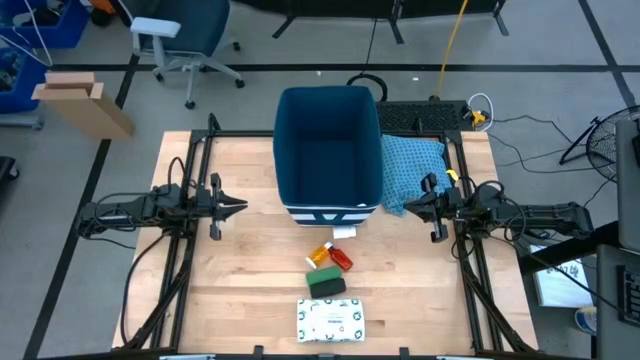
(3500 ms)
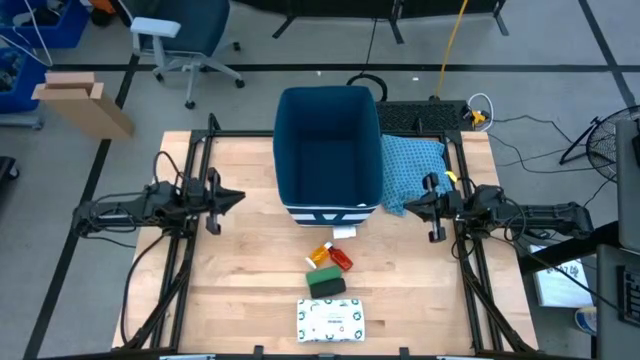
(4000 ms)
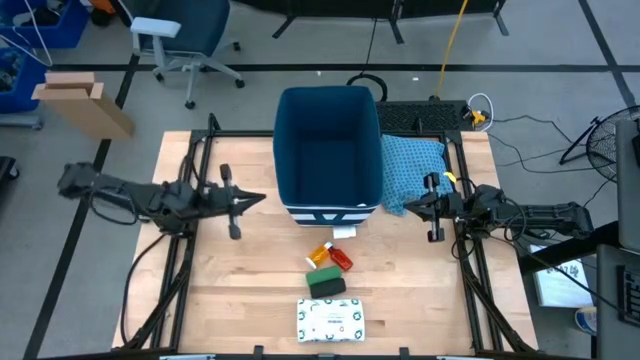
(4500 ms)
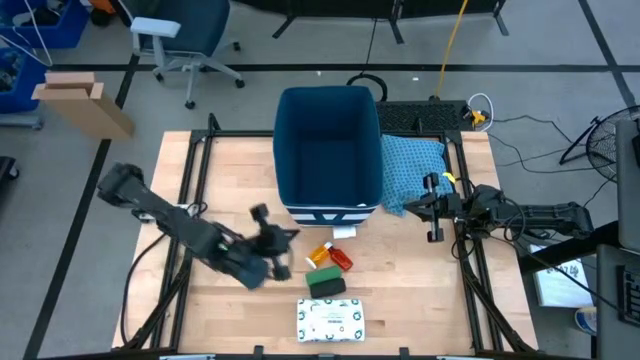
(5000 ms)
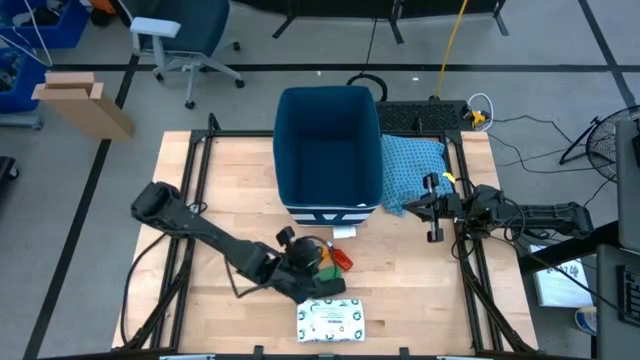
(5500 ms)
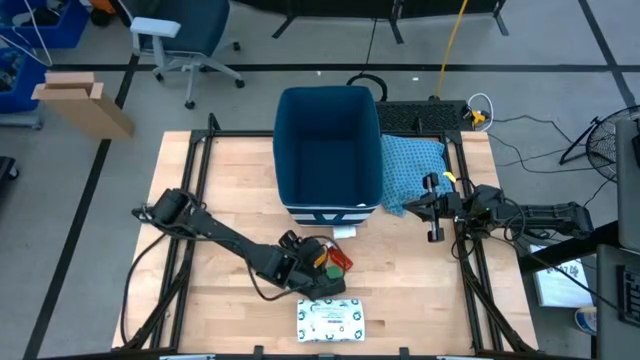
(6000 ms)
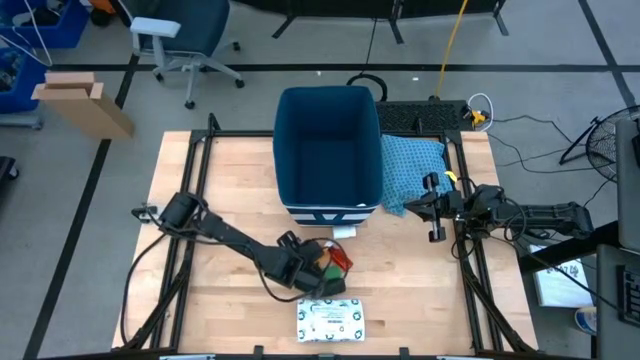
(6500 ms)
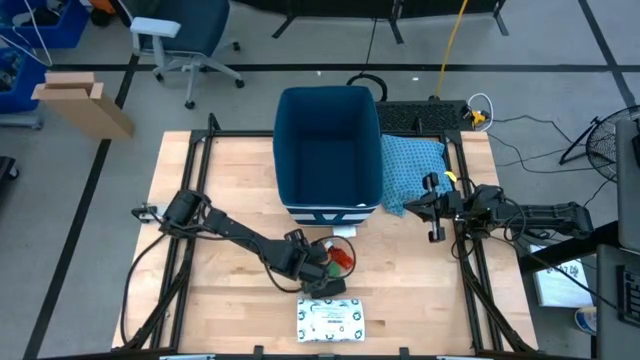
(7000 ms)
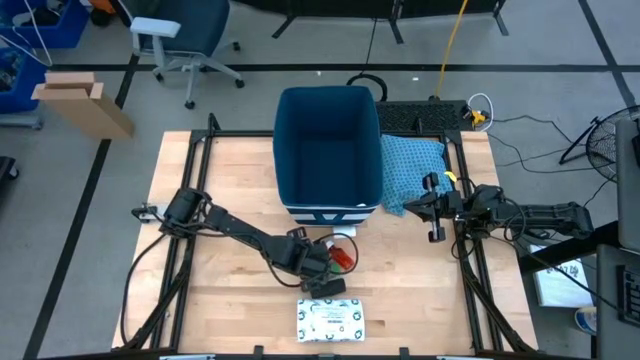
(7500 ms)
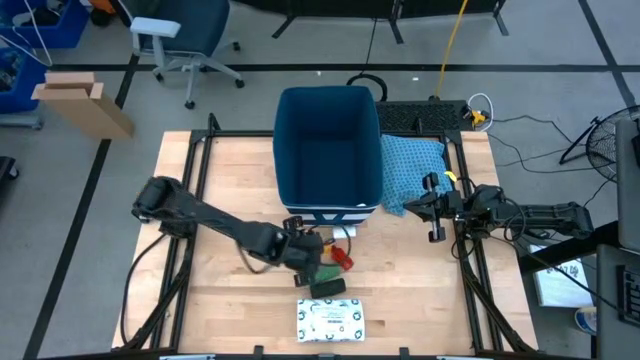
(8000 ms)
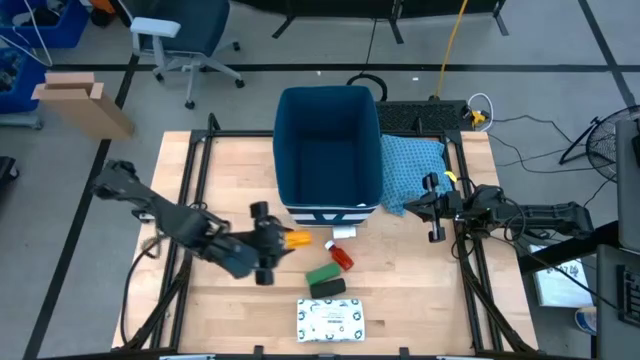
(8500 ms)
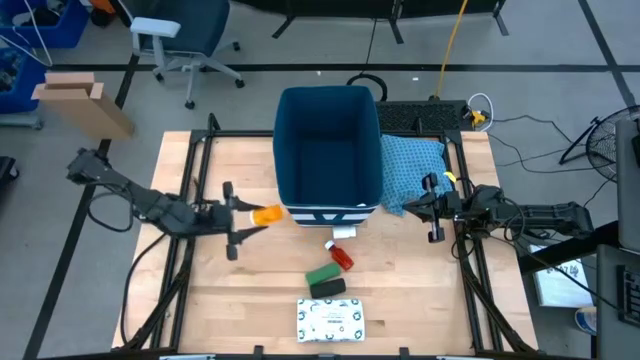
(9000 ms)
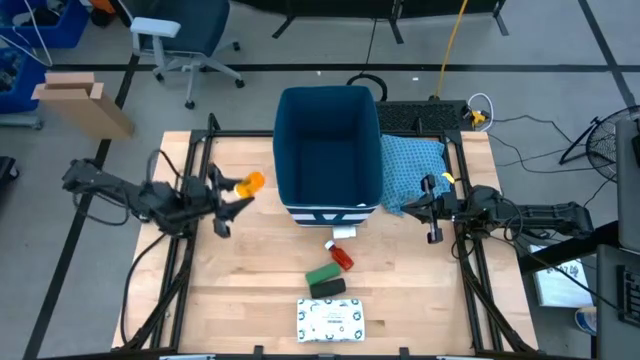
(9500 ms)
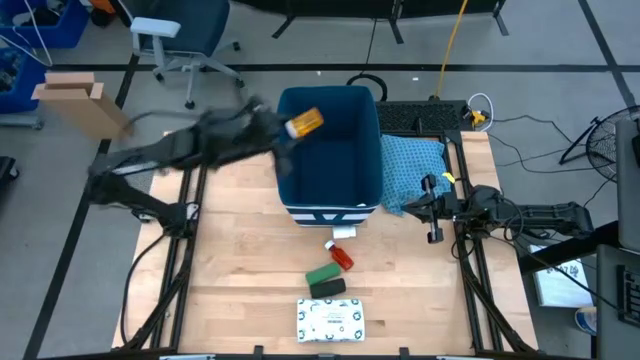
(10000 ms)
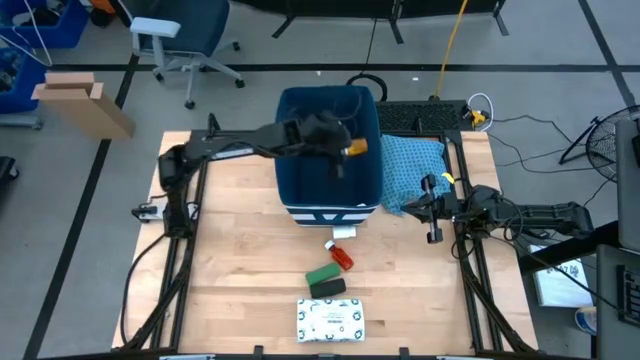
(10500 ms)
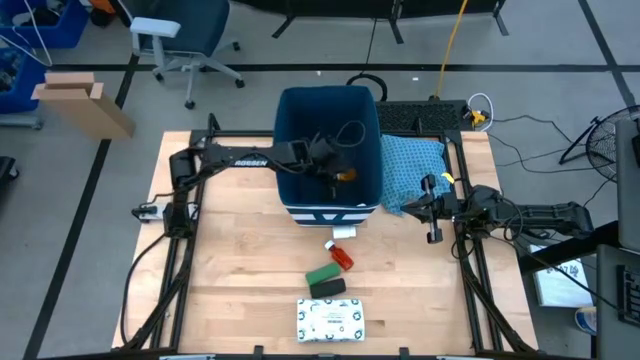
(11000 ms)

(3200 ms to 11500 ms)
Task: Pick & place medical supplies in basket/bin
Put the orange pill bottle into the blue bin

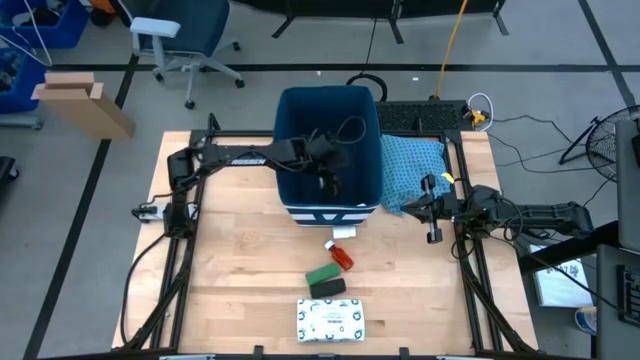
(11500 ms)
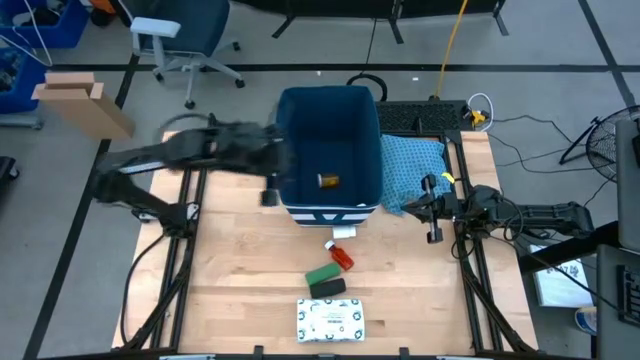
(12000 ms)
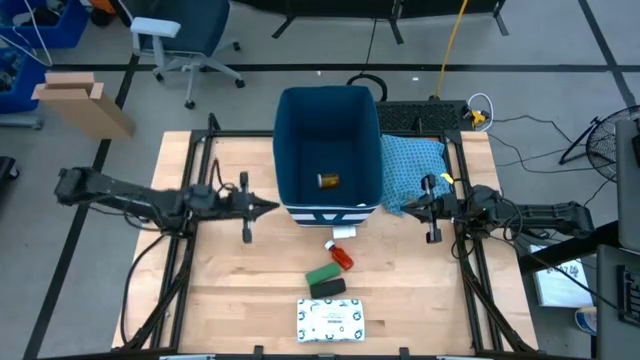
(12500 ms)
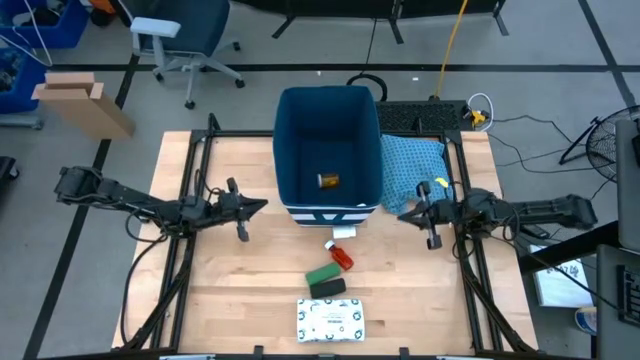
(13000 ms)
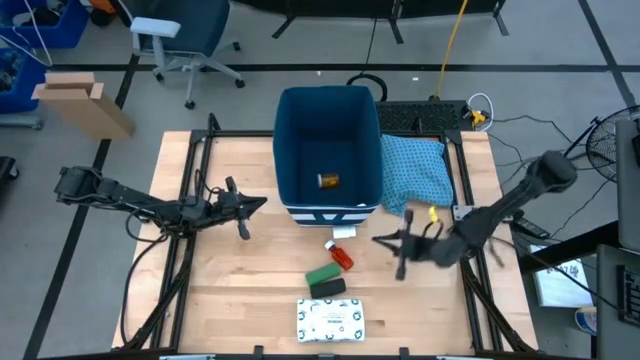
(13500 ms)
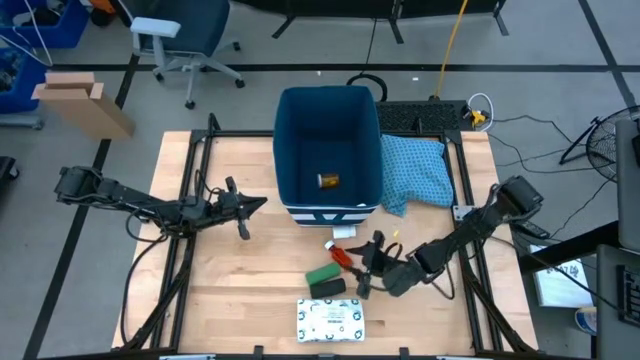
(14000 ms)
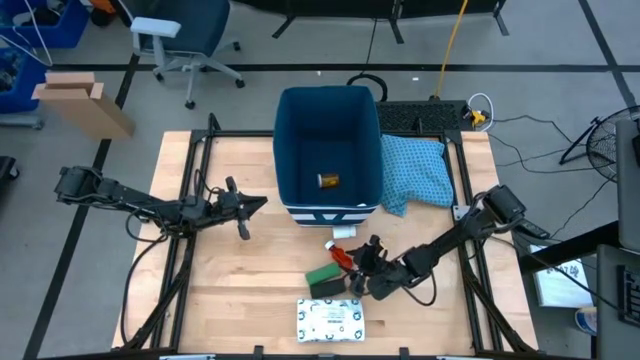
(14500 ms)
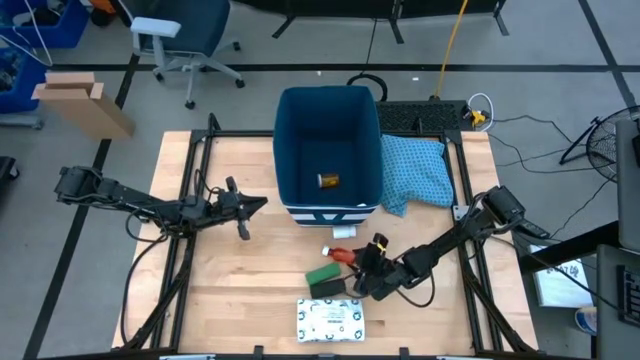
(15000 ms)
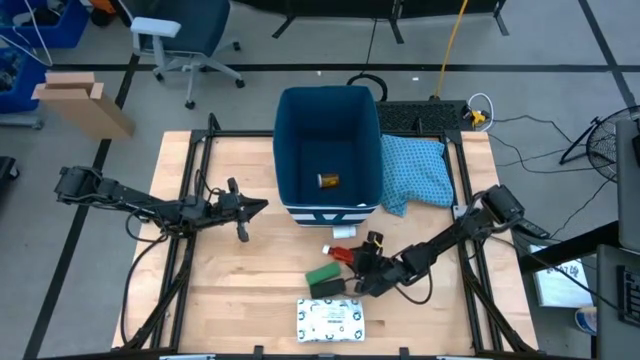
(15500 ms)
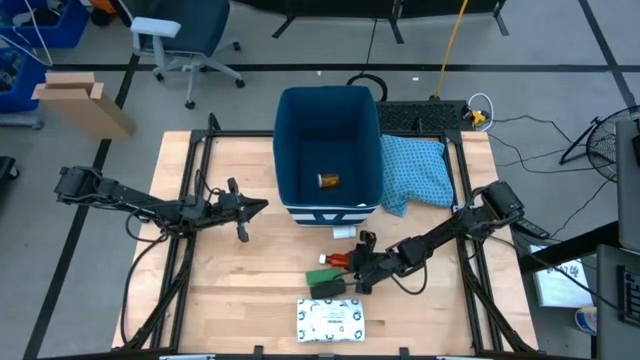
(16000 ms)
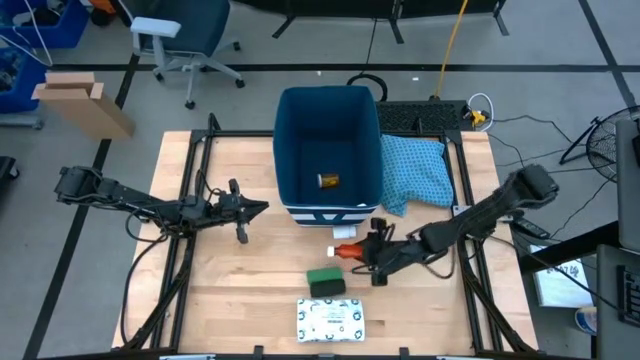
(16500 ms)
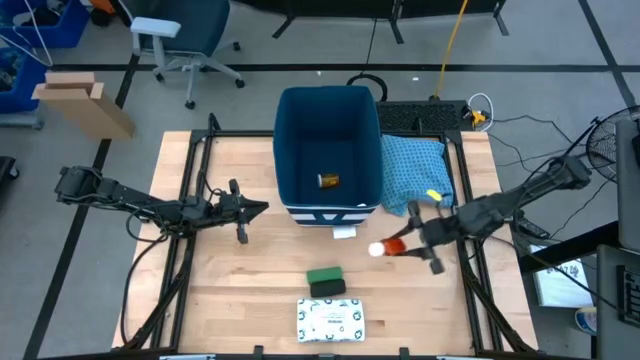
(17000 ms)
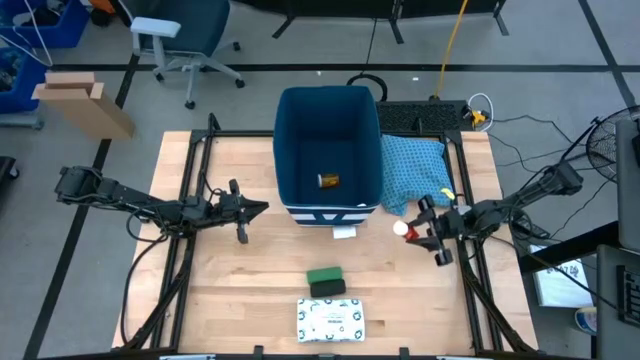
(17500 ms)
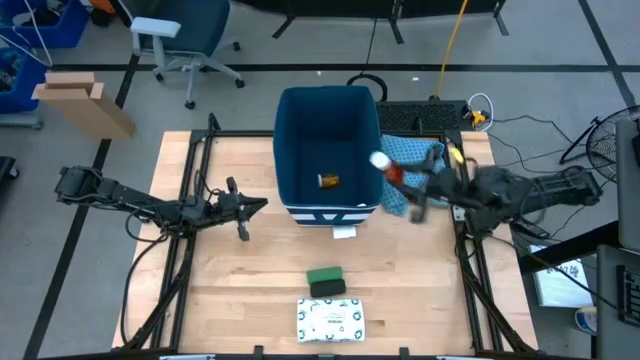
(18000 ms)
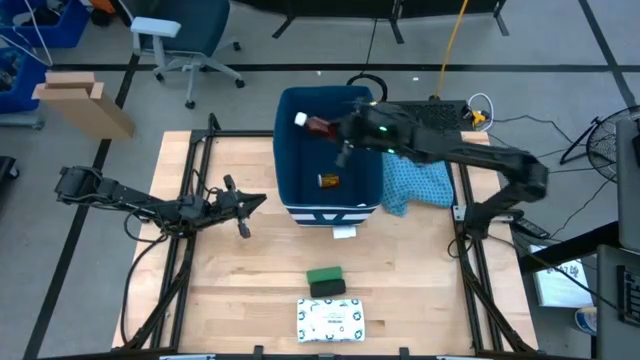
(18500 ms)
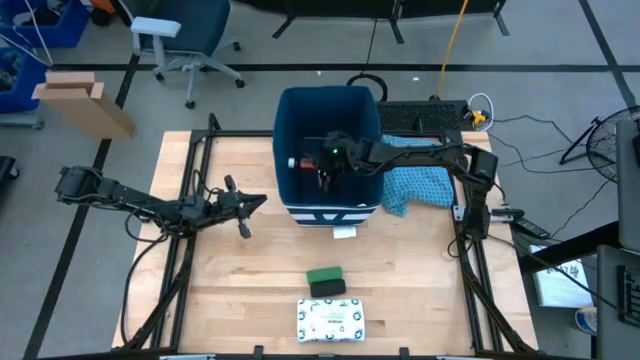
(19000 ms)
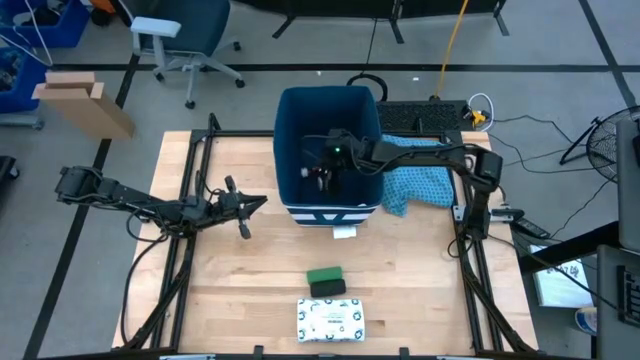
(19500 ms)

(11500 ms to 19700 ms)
Put the red pill bottle into the blue bin

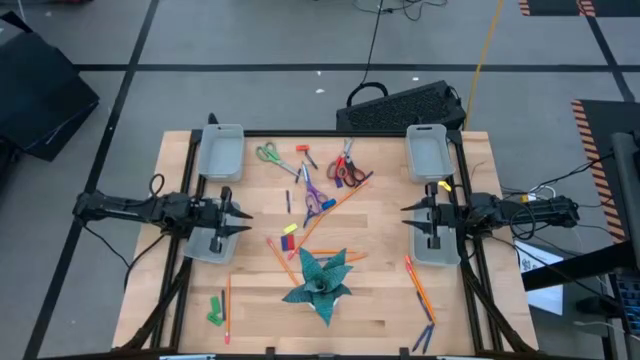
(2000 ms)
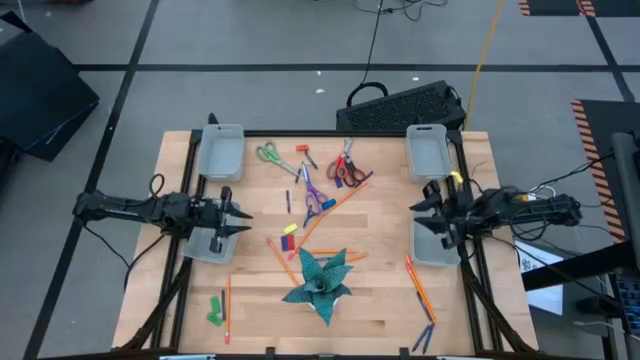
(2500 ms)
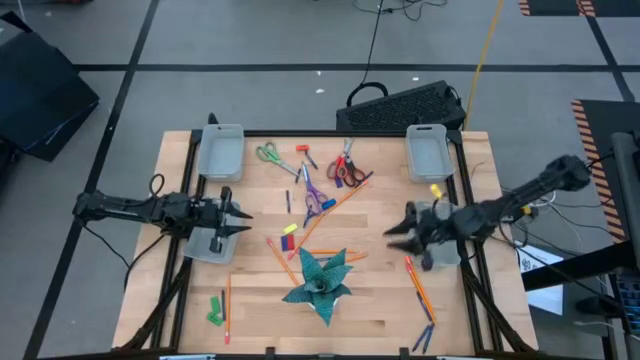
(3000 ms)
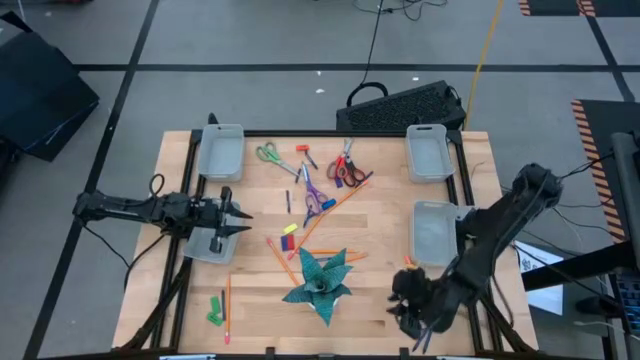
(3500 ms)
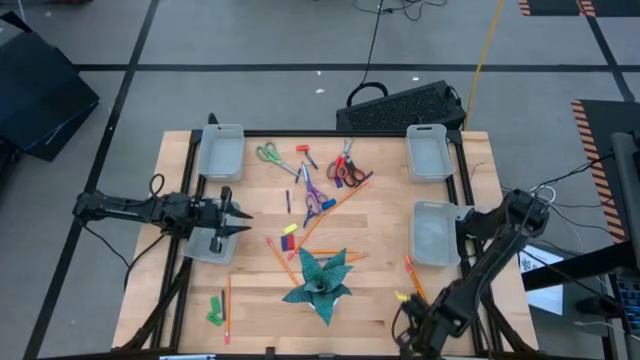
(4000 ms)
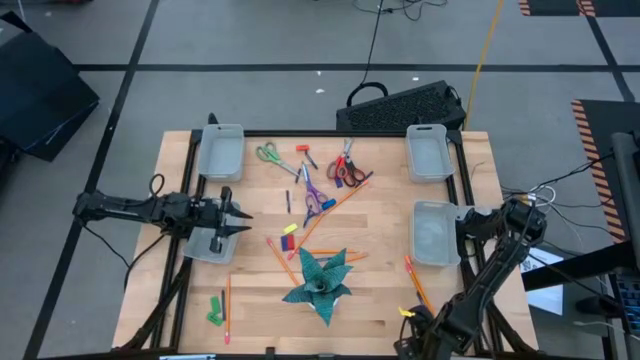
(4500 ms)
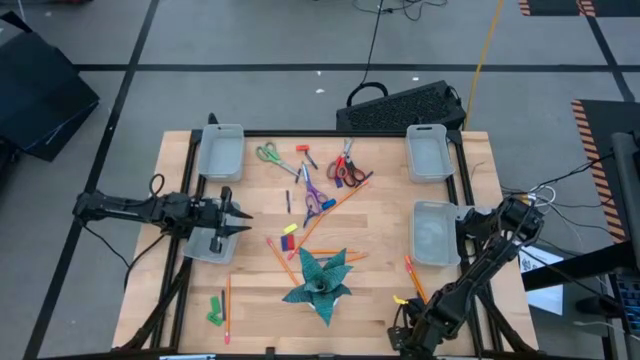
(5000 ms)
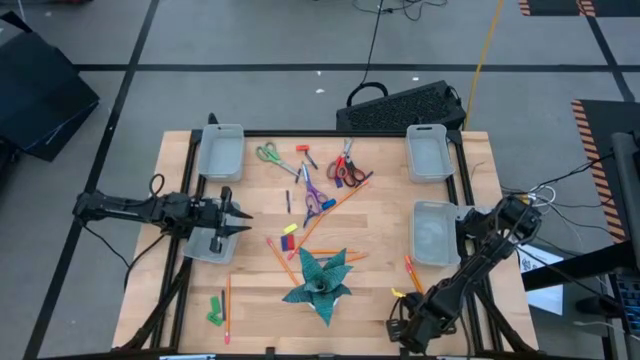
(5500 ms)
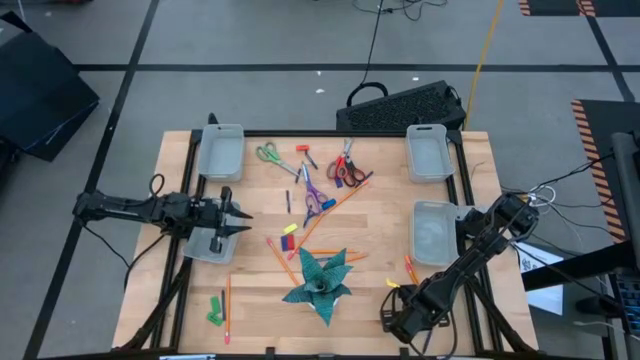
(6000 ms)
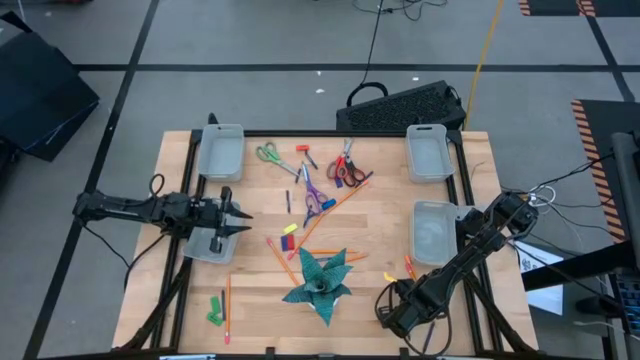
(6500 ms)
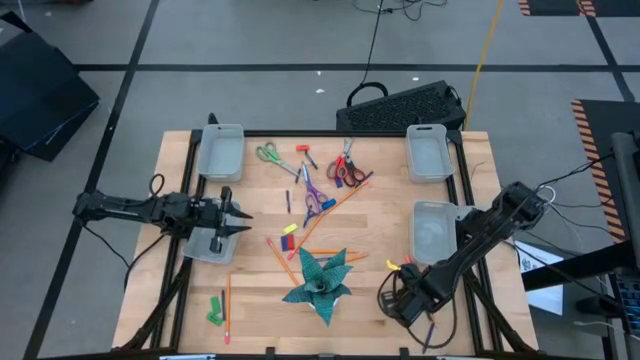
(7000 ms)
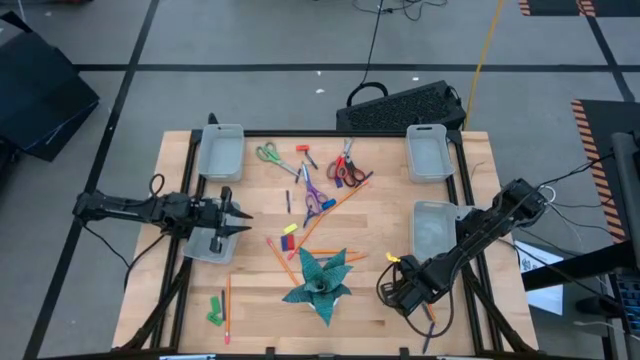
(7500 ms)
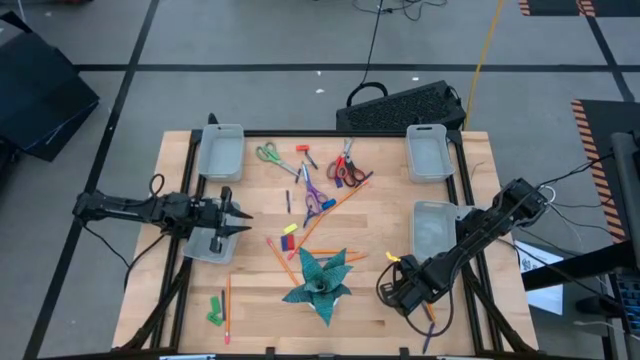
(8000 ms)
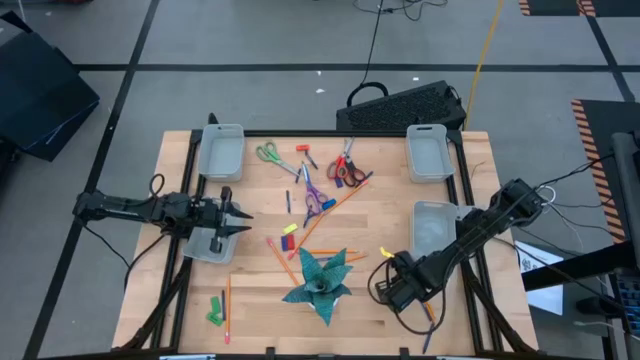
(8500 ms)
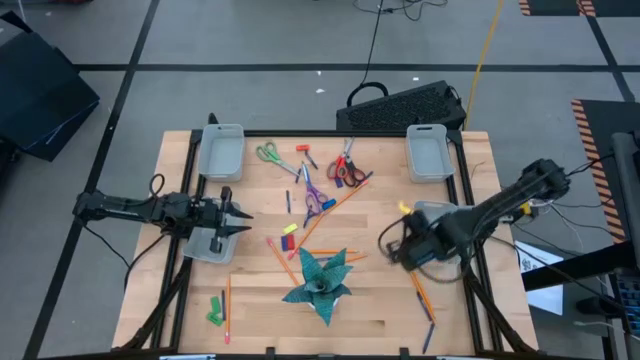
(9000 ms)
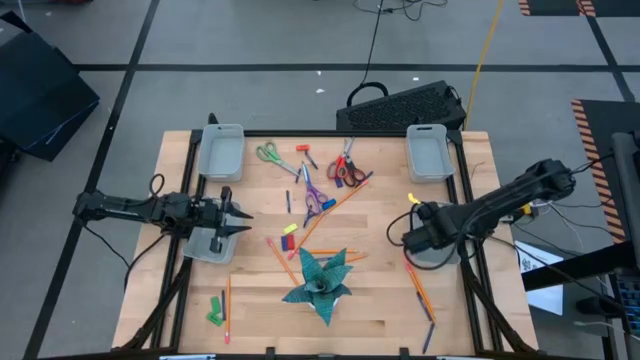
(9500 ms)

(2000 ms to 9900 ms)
Task: Sort crayons/erasers/pens/pencils in bins
Put the blue crayon into the bottom right gray bin
